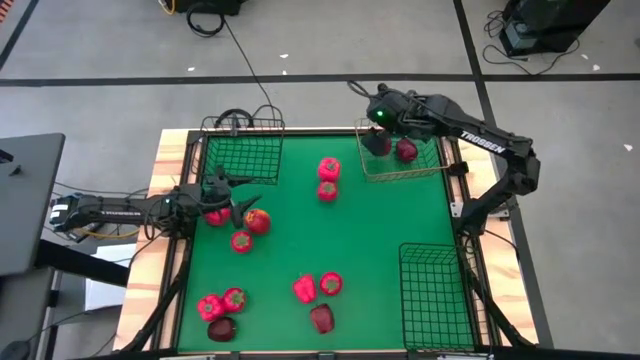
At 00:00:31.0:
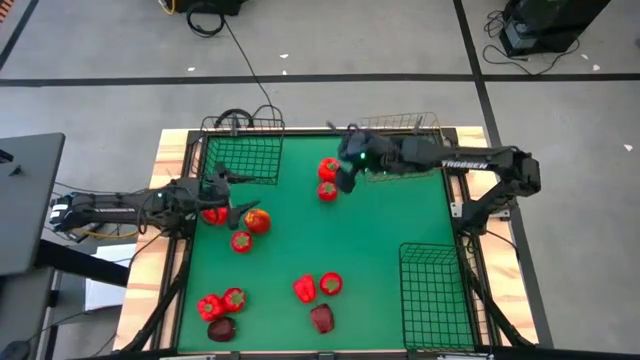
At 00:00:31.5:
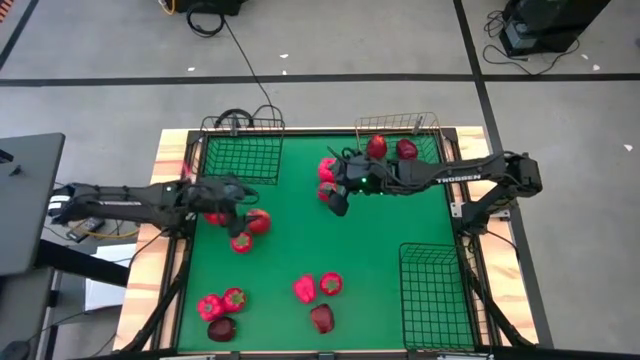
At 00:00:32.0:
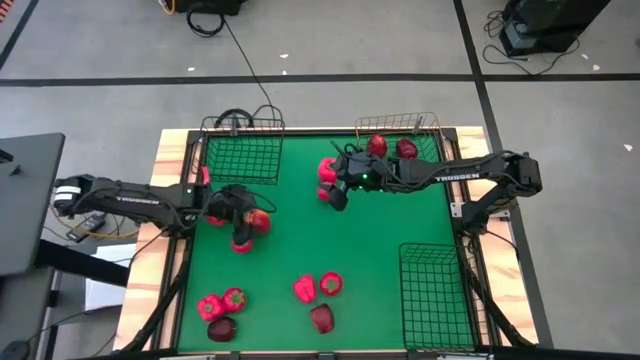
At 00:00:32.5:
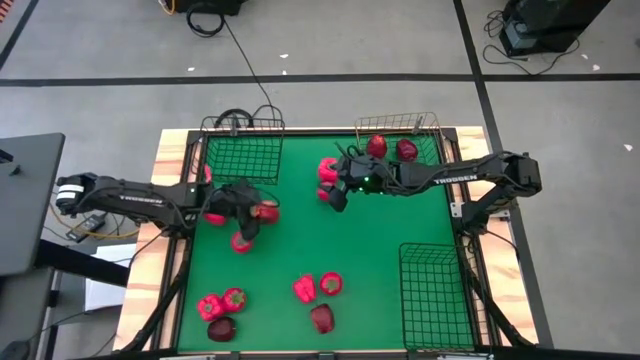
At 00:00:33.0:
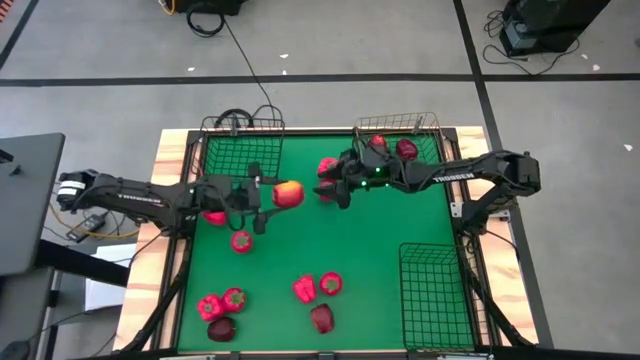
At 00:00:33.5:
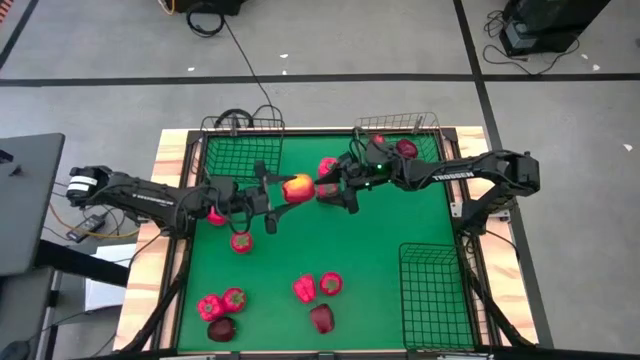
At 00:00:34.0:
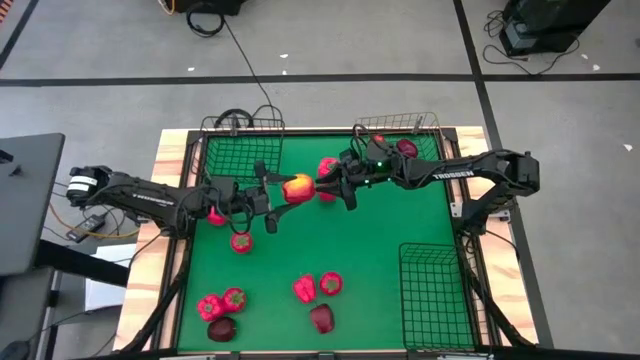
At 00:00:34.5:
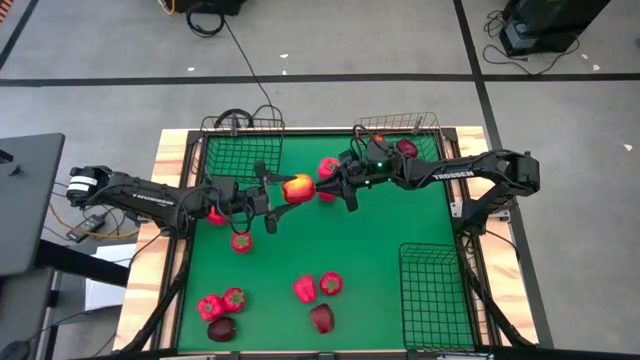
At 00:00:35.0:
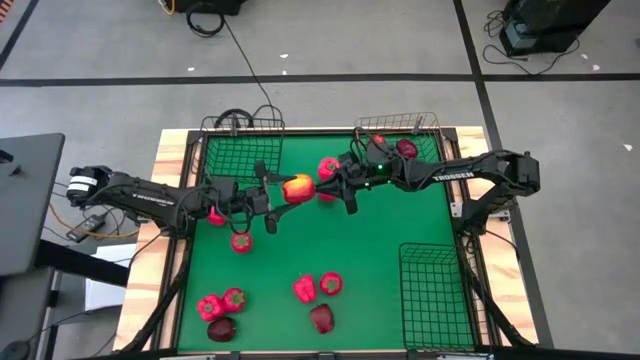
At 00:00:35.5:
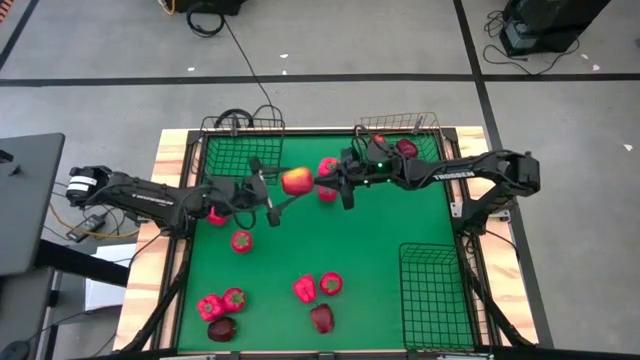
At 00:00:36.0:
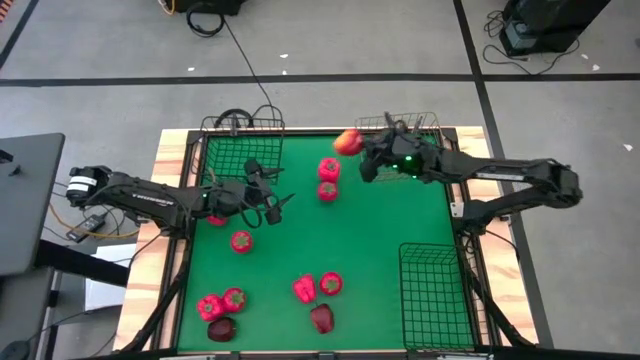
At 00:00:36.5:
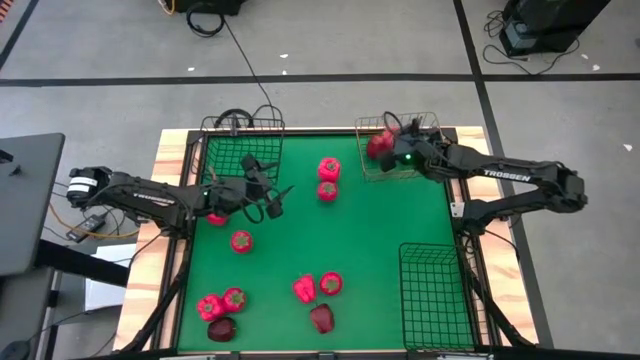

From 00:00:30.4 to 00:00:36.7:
Task: Sort produce into baskets
Put the red apple into the gold wire basket

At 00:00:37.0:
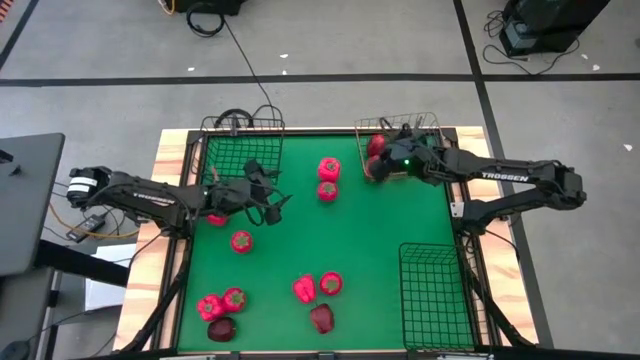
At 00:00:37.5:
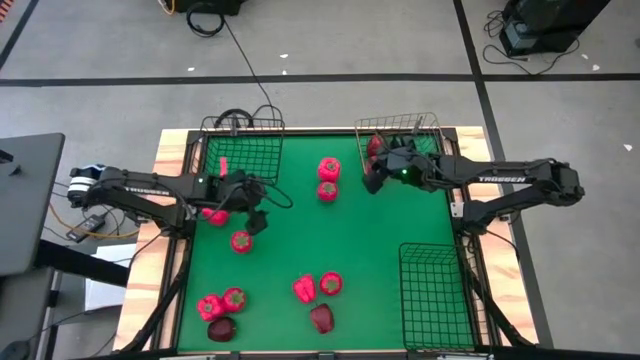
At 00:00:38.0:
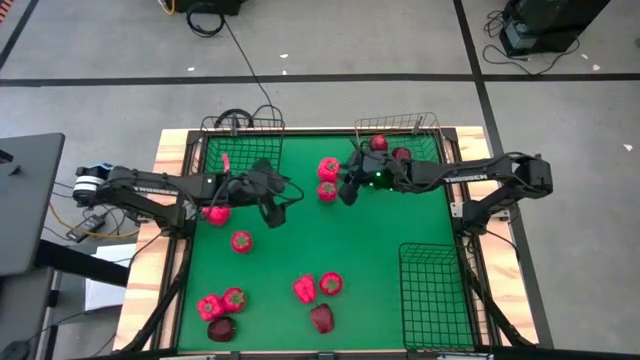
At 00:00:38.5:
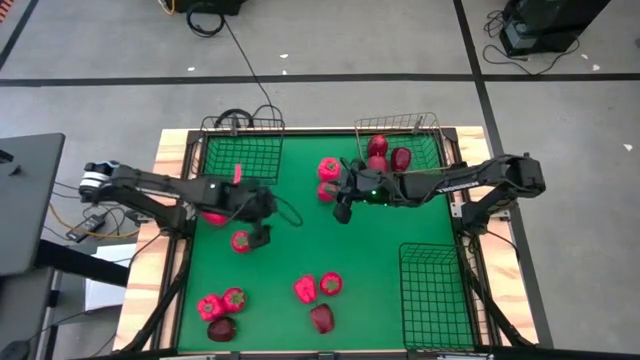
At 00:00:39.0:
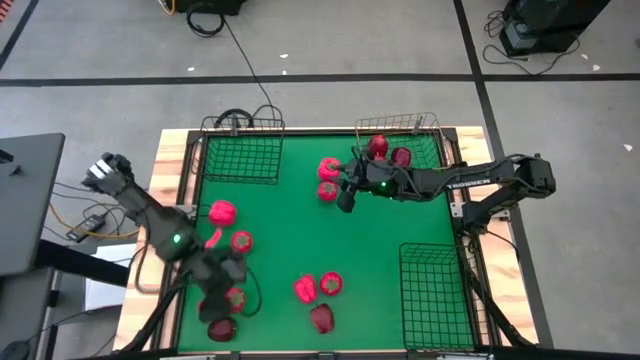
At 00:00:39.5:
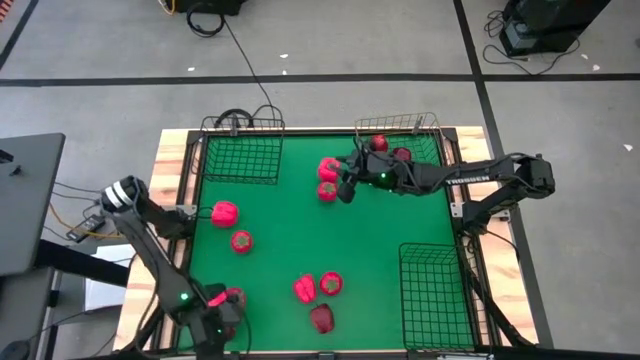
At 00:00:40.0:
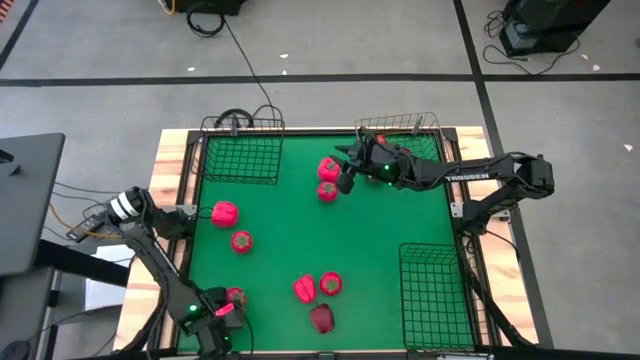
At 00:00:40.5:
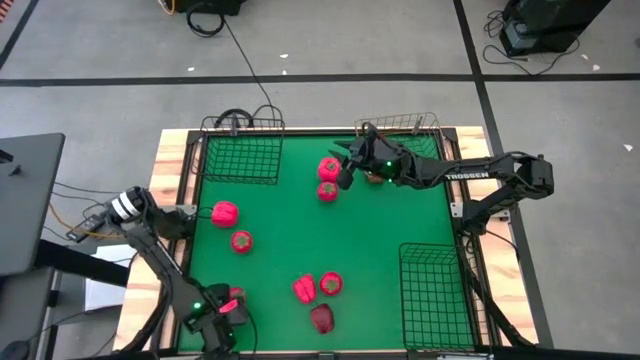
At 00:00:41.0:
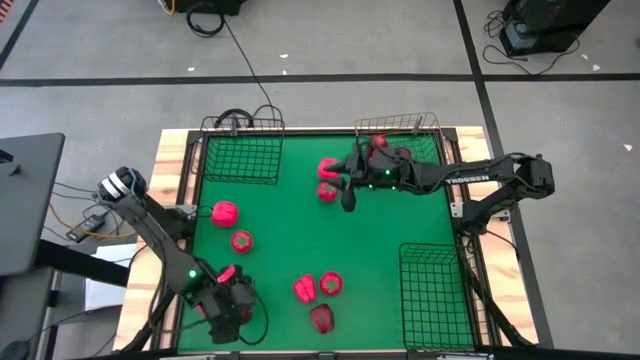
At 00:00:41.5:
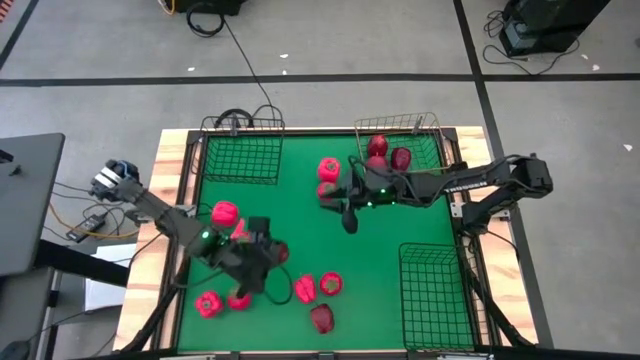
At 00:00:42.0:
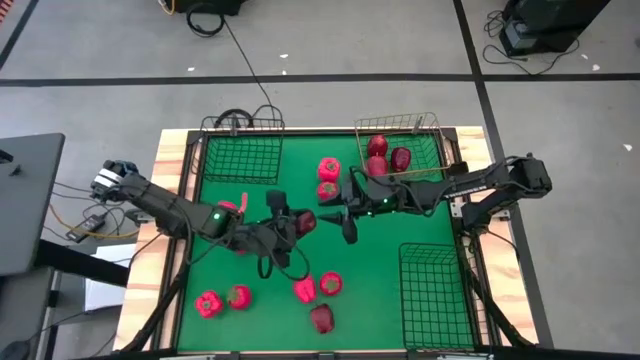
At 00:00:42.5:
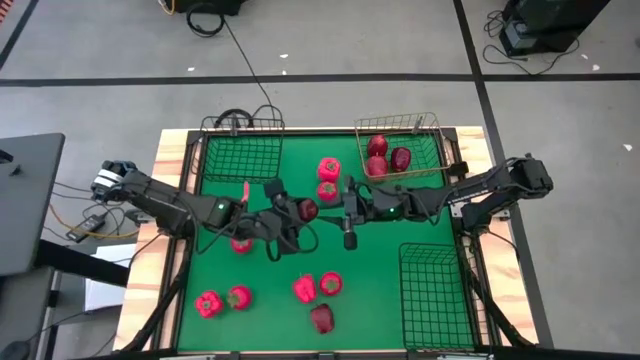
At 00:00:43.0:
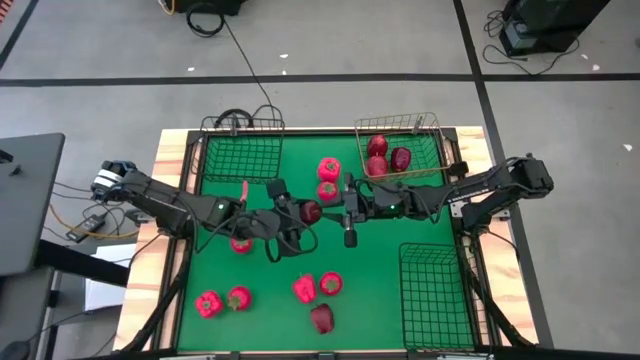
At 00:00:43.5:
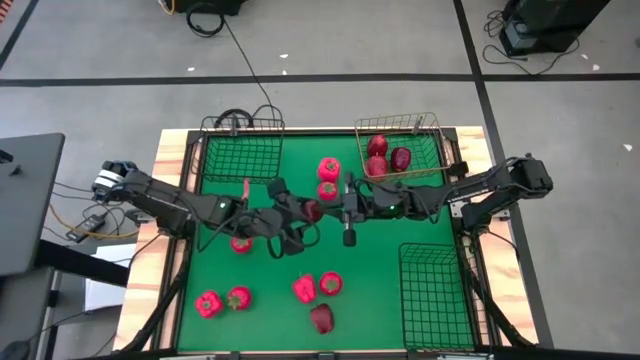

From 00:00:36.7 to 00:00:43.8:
Put the red apple into the gold wire basket

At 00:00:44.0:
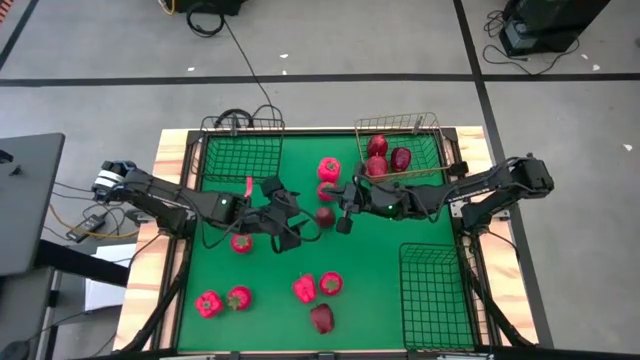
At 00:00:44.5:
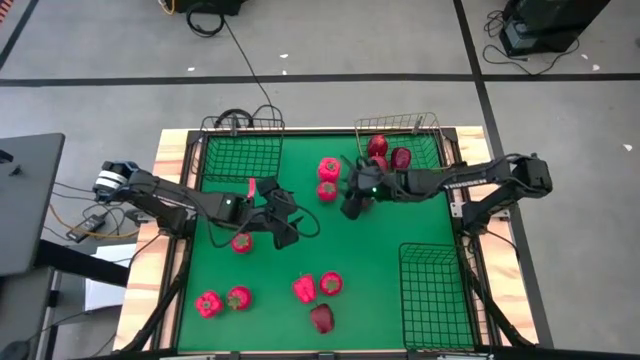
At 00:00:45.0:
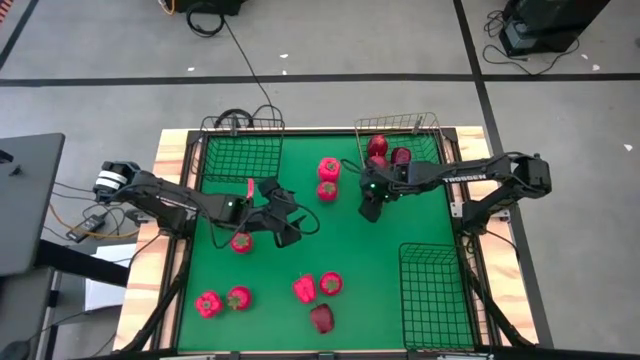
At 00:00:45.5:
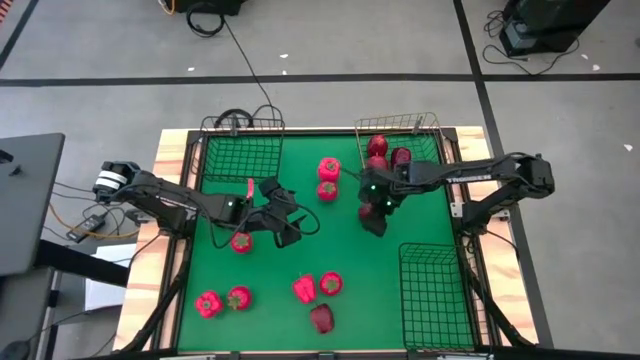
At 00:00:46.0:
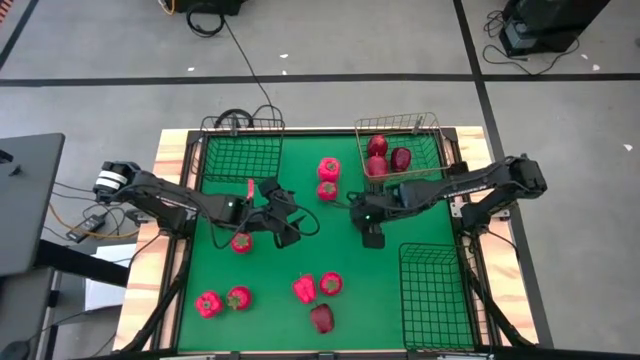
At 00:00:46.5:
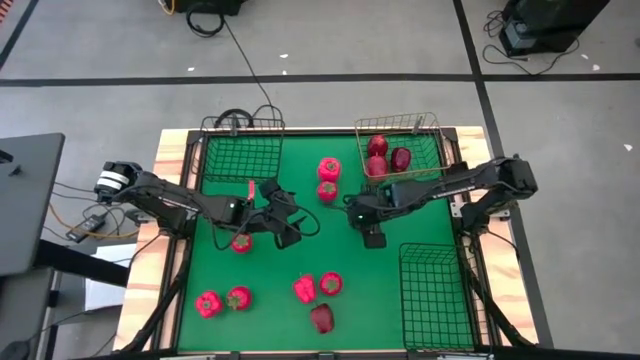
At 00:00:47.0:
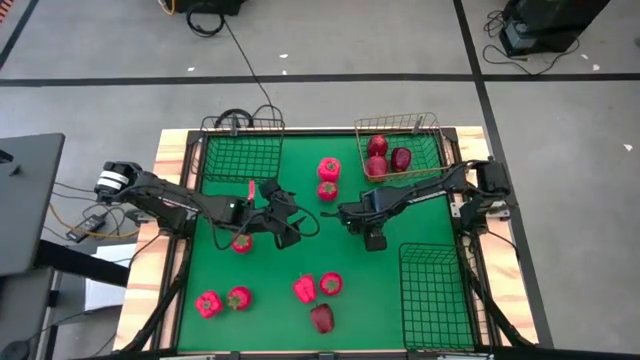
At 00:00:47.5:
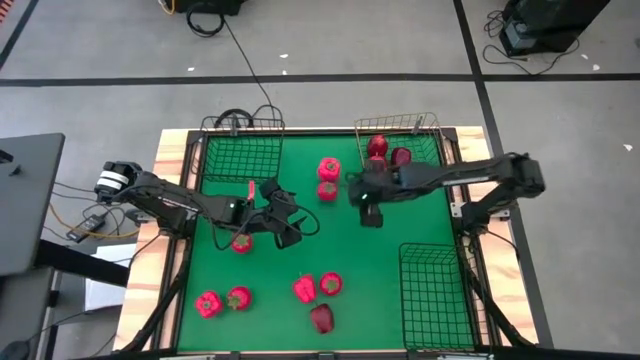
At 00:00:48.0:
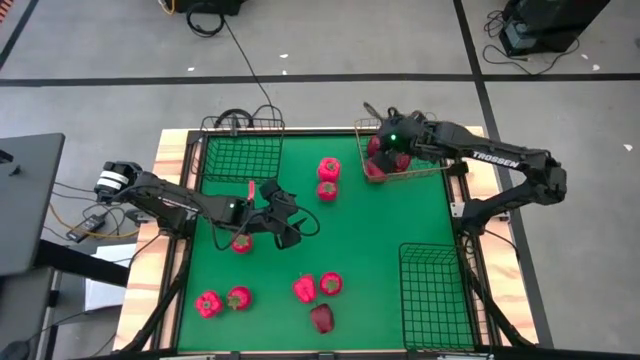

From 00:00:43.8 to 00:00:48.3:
Put the red apple into the gold wire basket

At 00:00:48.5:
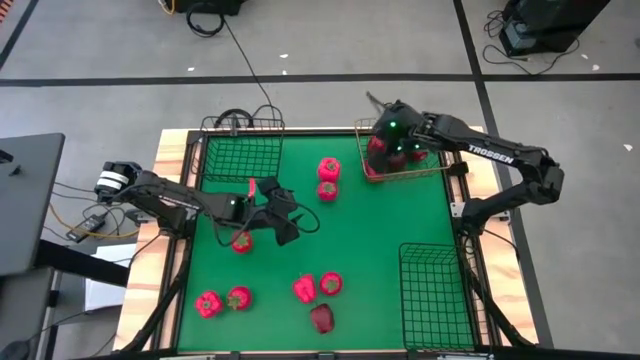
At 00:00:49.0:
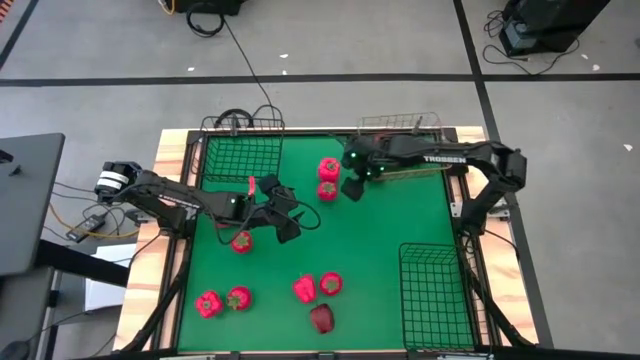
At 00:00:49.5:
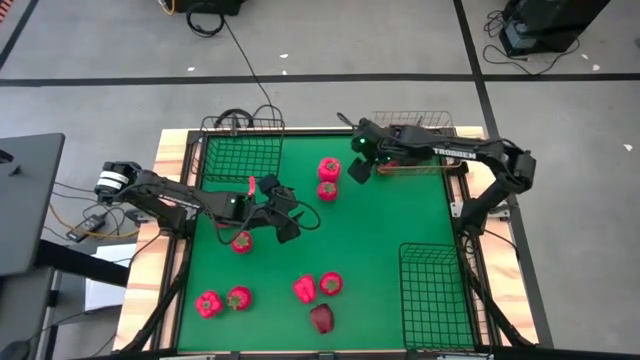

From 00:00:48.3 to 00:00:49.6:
Adjust the gold wire basket
